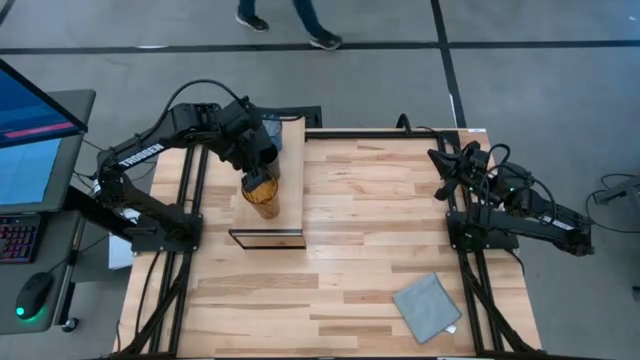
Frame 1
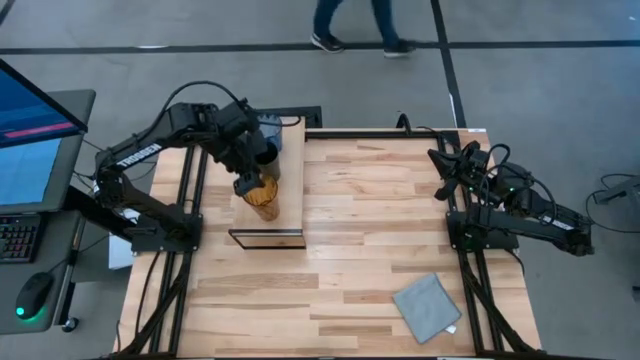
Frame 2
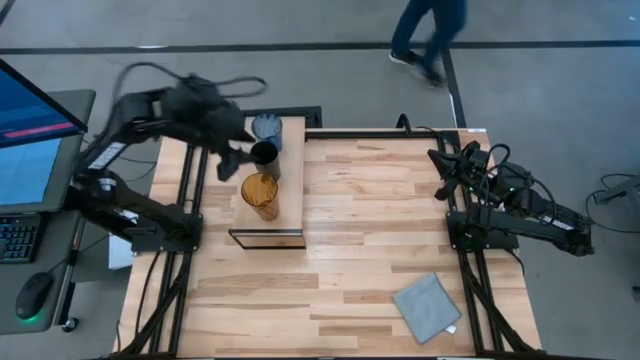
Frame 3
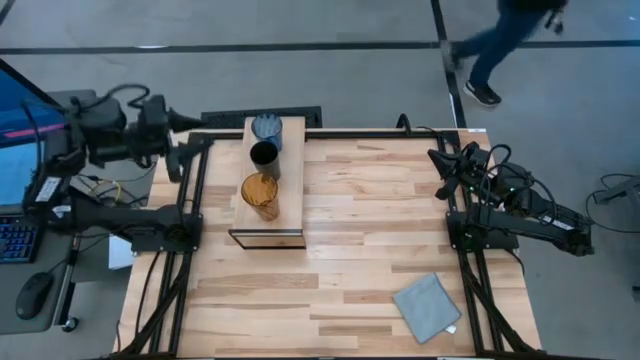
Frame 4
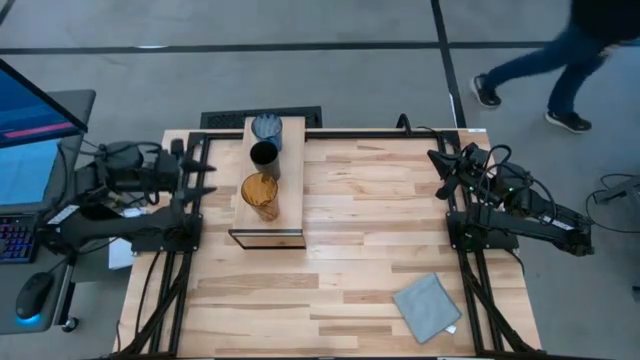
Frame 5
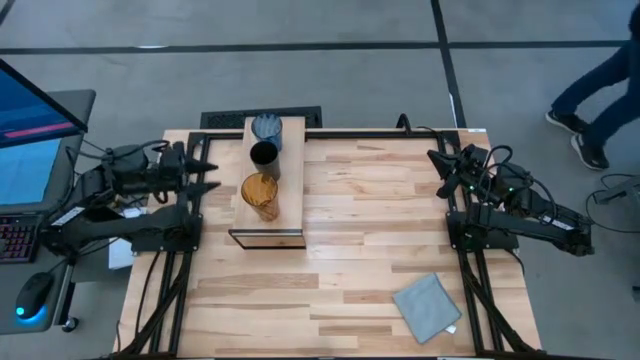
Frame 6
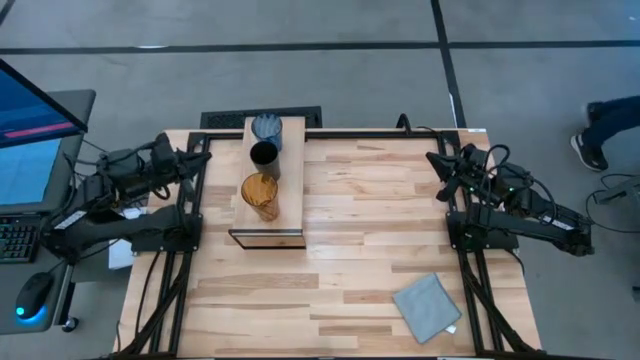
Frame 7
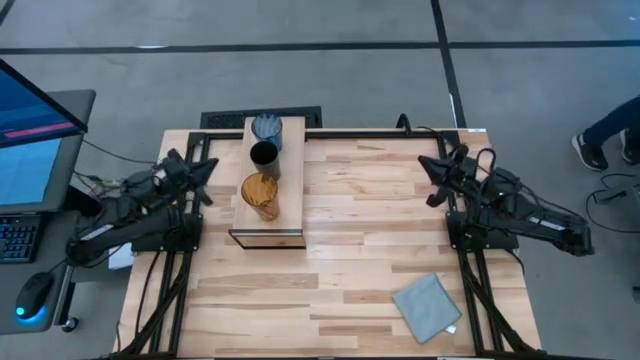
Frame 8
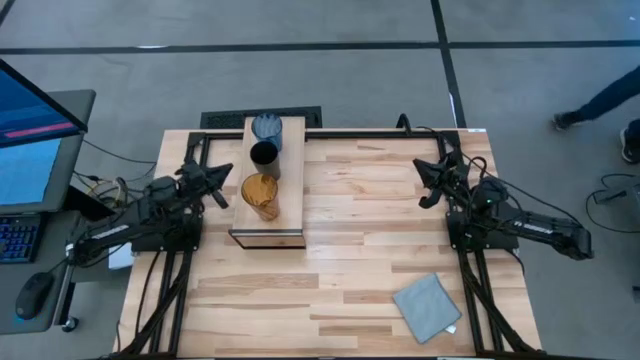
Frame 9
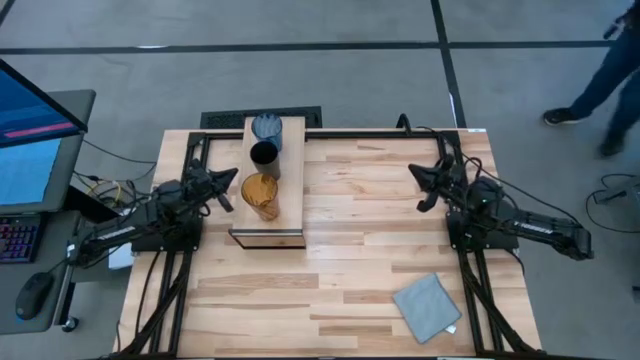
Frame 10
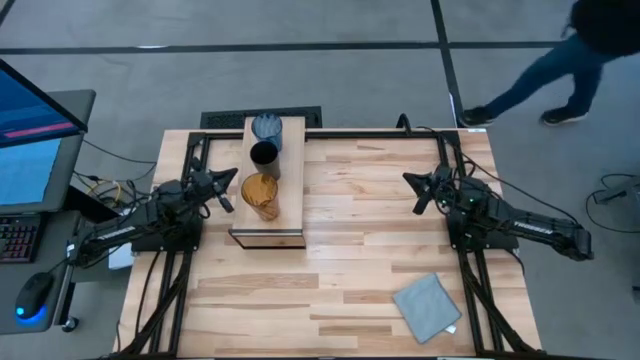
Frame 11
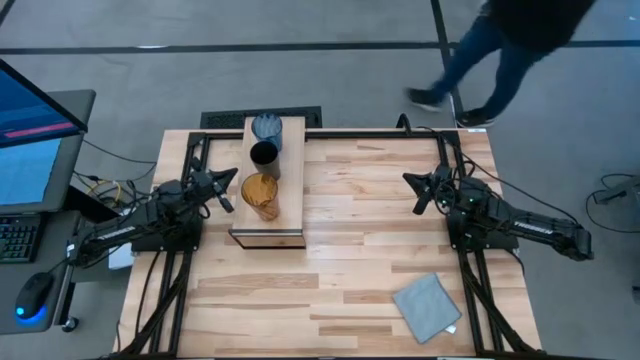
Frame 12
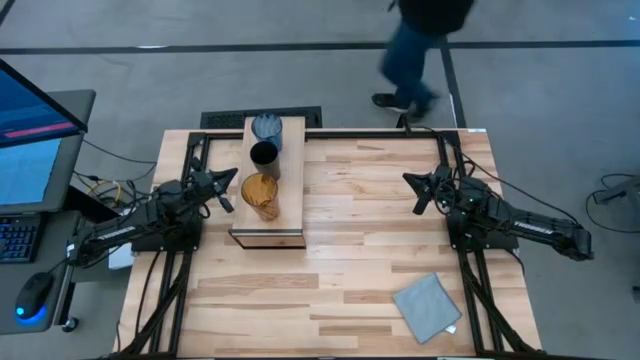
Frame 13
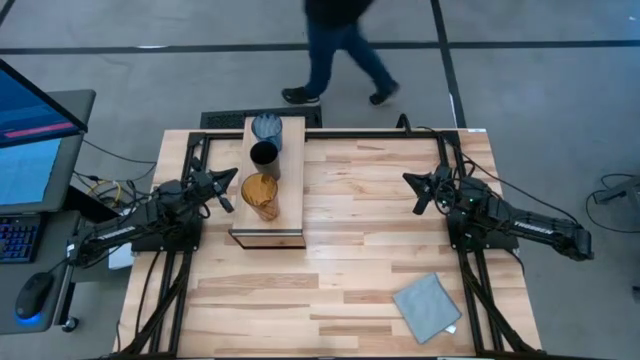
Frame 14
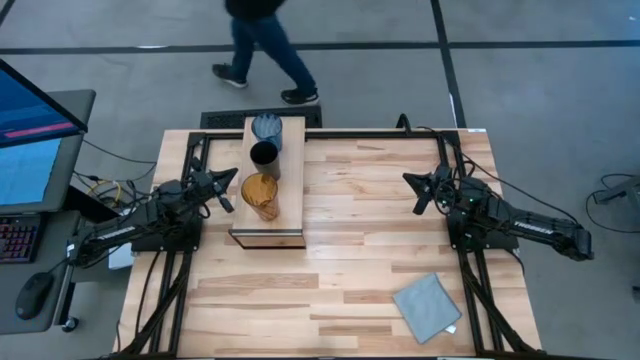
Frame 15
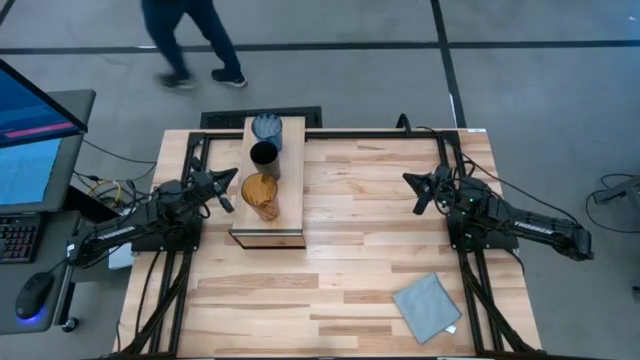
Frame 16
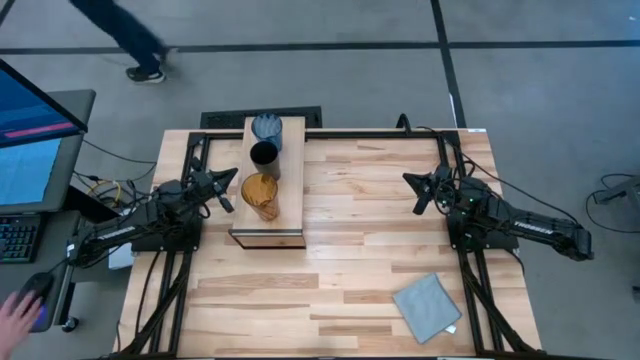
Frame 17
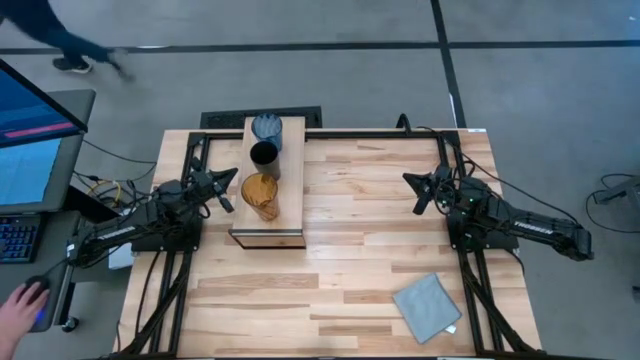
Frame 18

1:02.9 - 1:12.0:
Task: Stack small to large cups/mugs on shelf
Return to Home Position

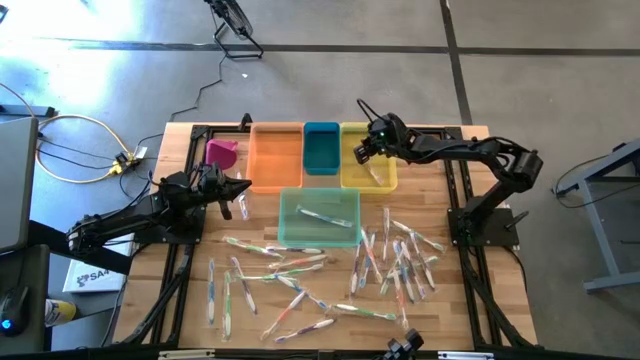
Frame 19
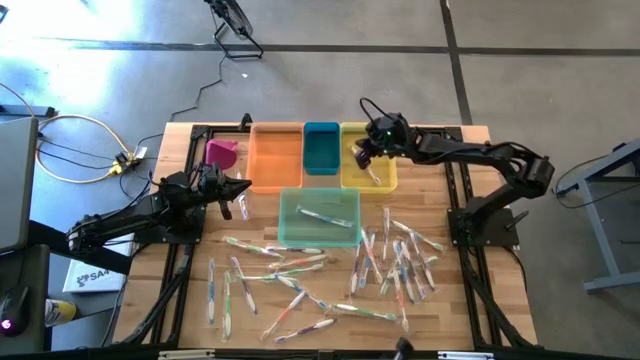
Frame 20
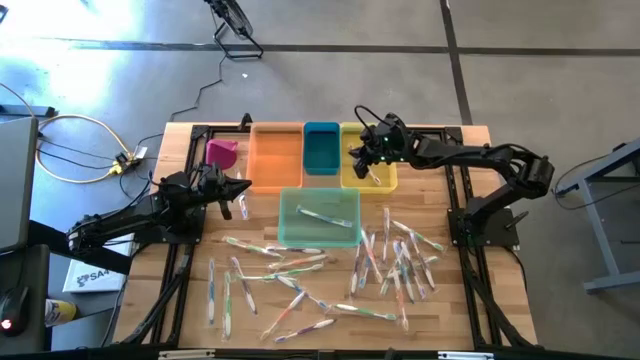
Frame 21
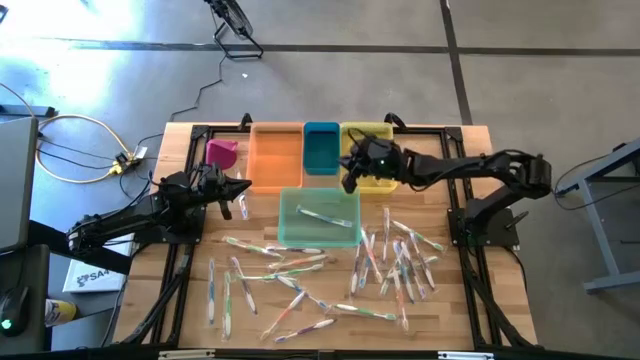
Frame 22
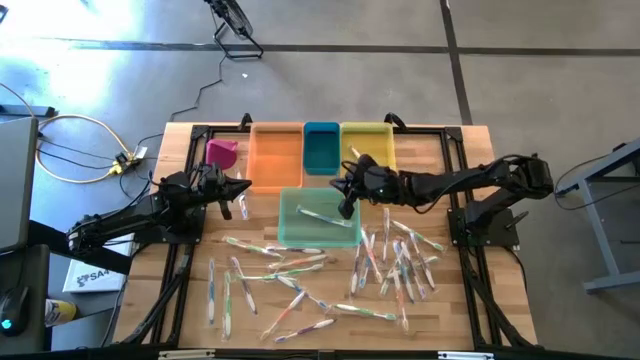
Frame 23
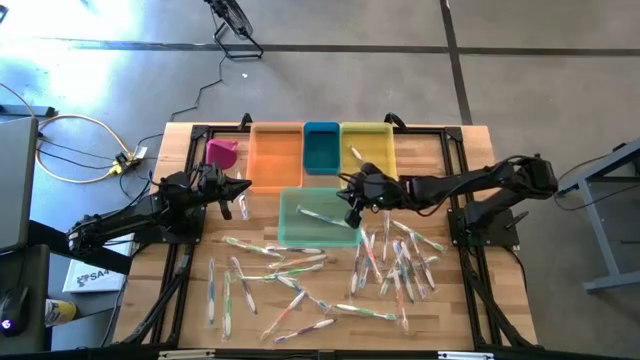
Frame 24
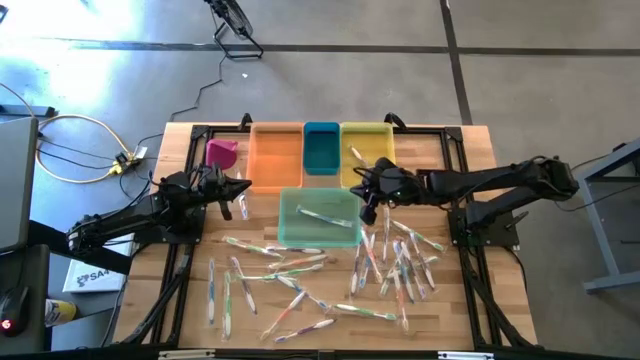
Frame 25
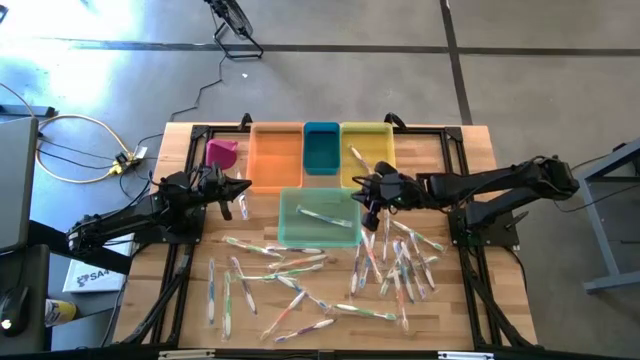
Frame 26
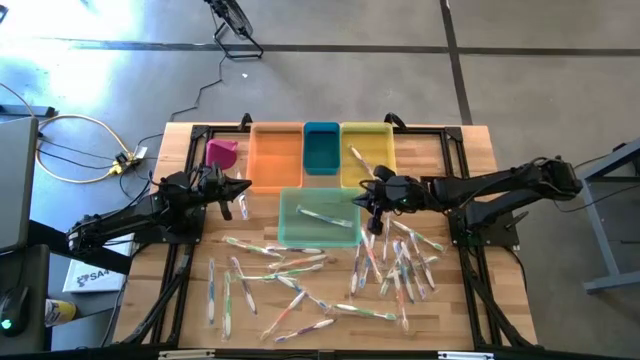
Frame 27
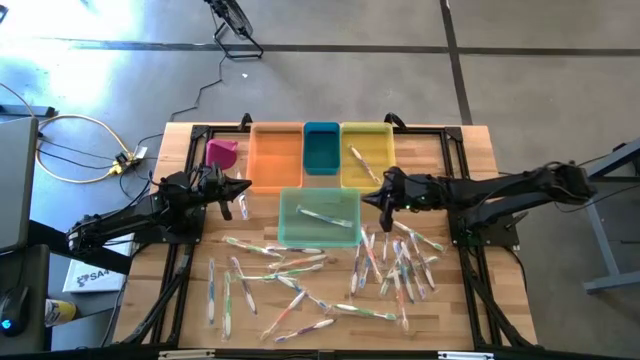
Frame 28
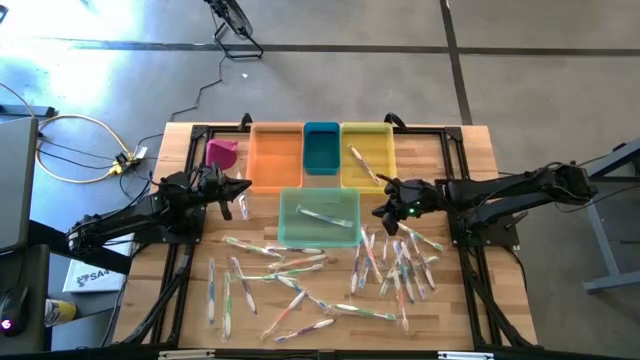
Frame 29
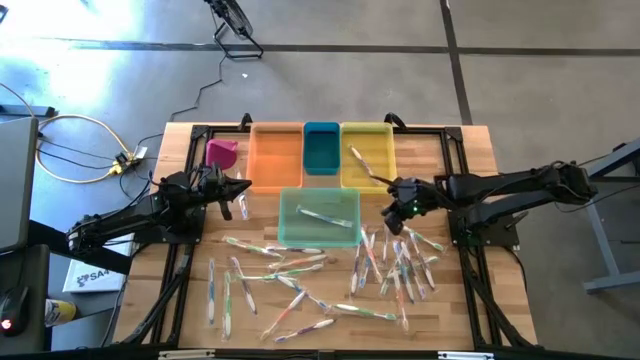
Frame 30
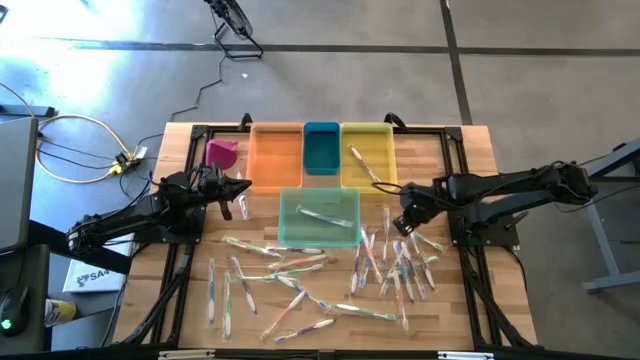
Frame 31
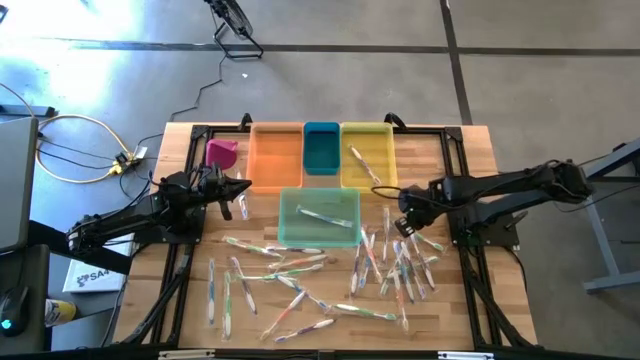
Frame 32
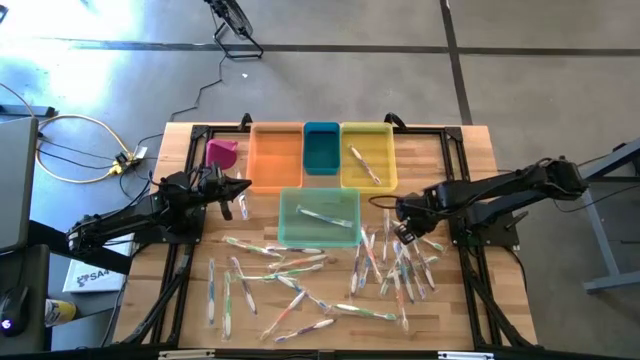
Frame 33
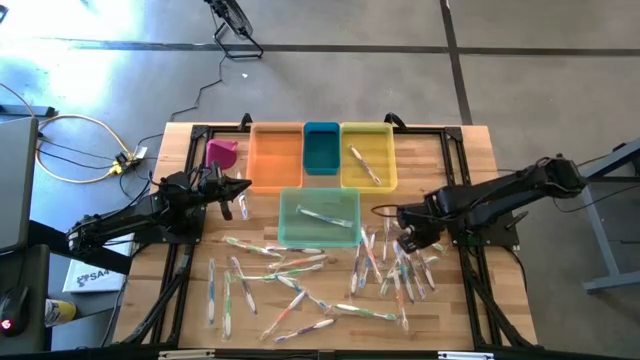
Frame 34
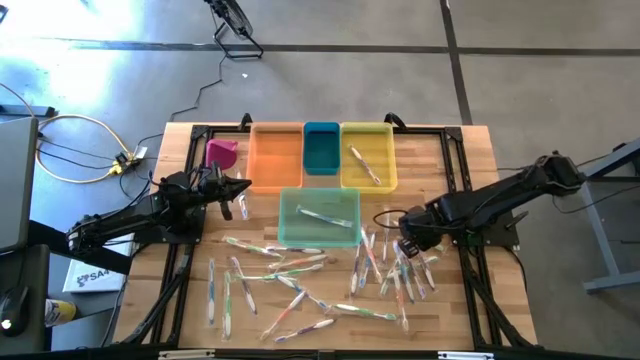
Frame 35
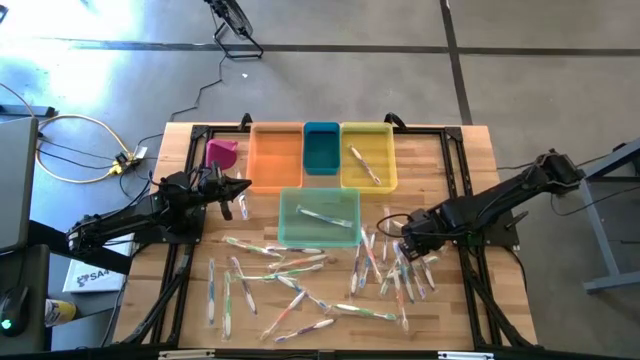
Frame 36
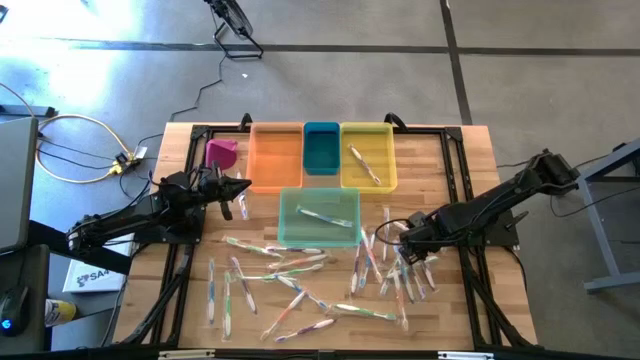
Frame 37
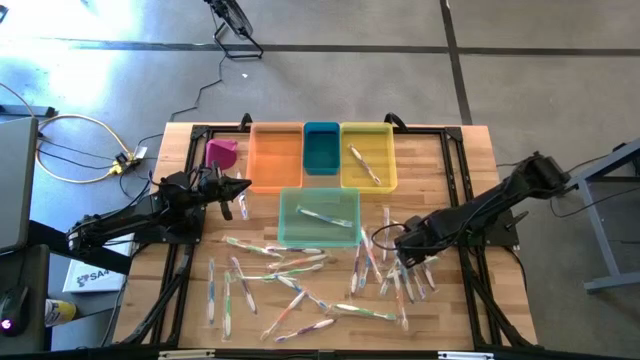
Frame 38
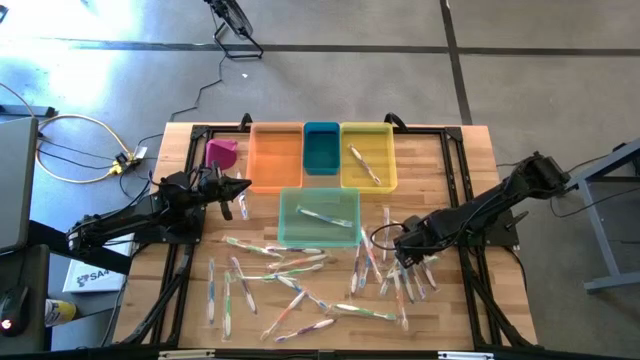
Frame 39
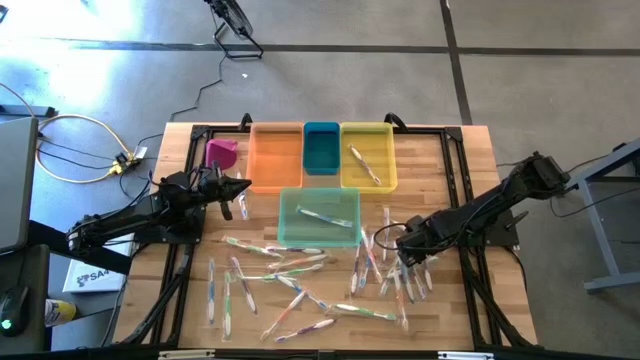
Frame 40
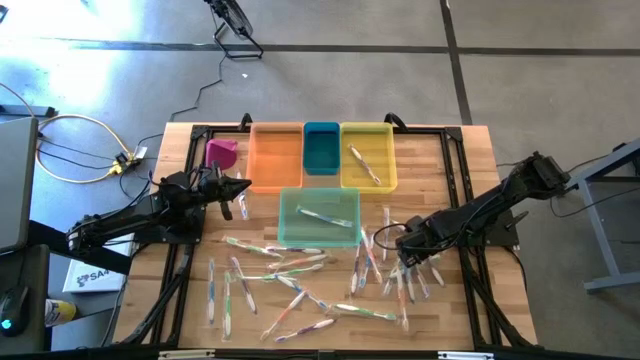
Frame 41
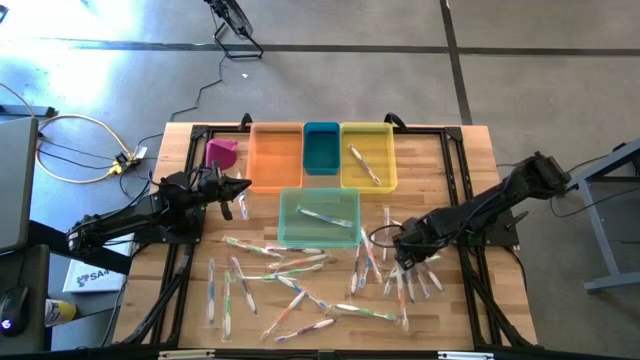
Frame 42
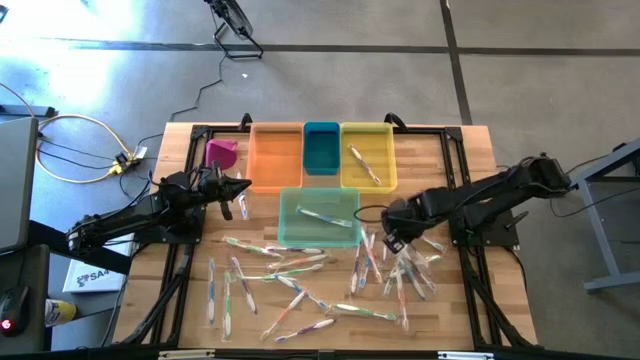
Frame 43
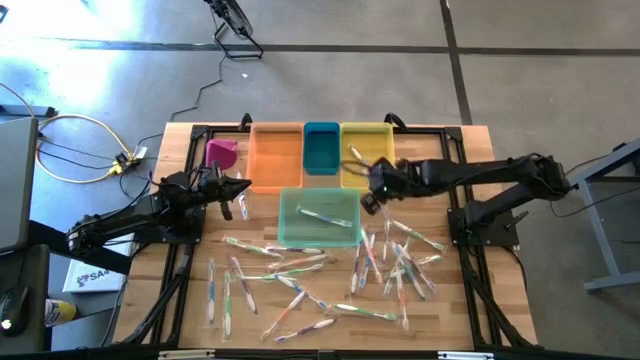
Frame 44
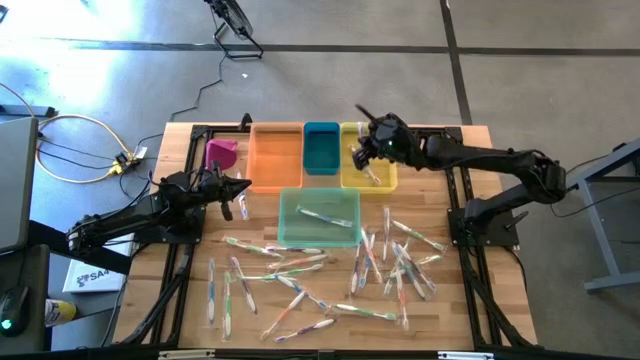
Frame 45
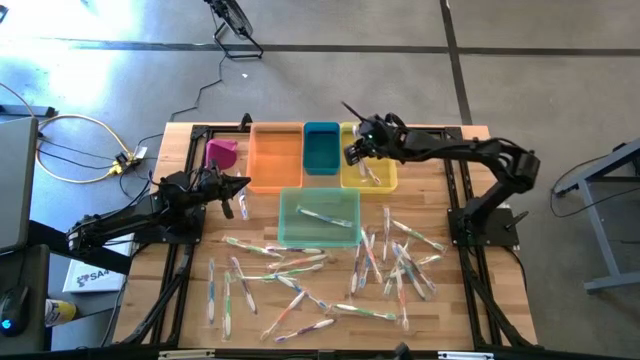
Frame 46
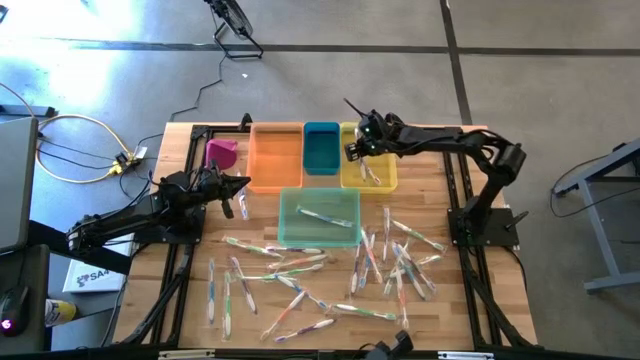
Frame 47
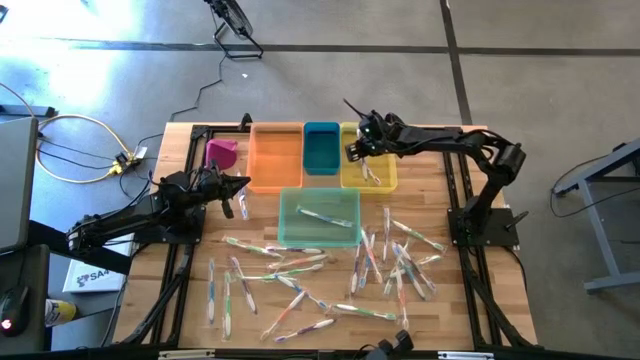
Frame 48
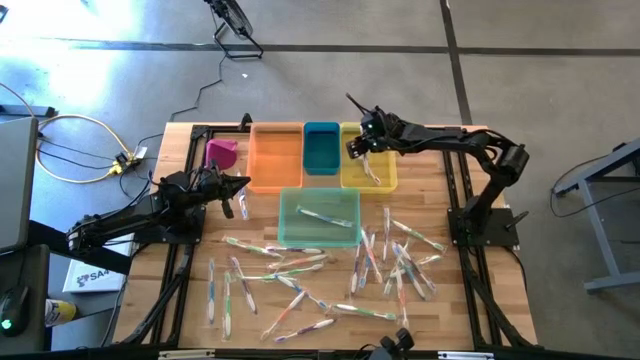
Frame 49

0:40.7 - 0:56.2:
Task: Pick & Place Toothbrushes
Put the purple toothbrush into the yellow bin
